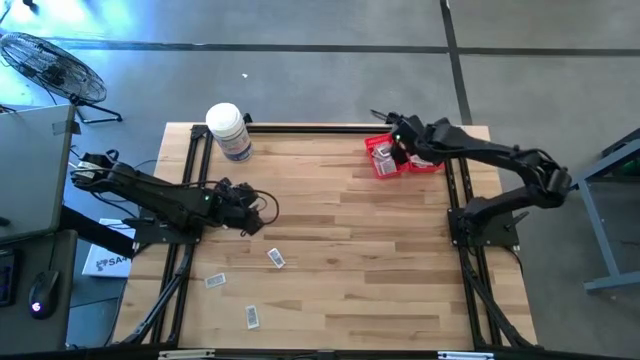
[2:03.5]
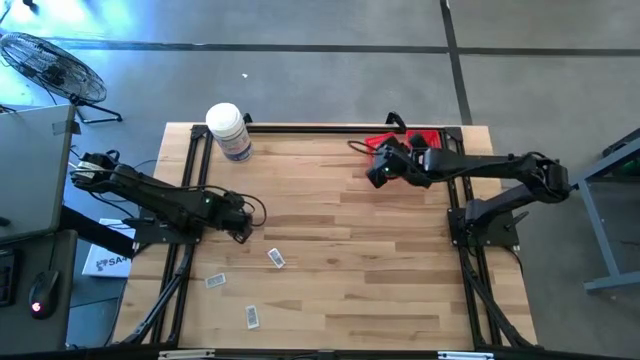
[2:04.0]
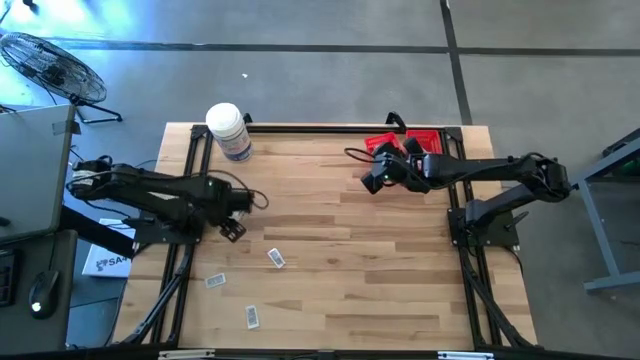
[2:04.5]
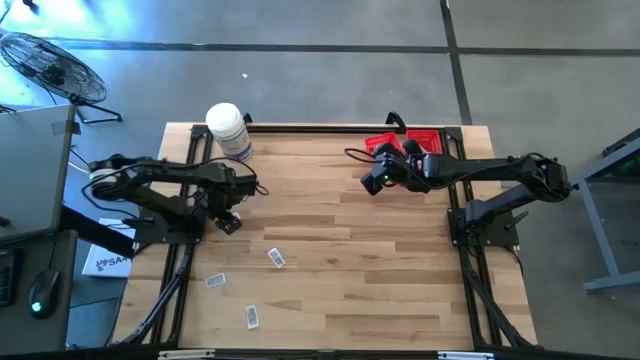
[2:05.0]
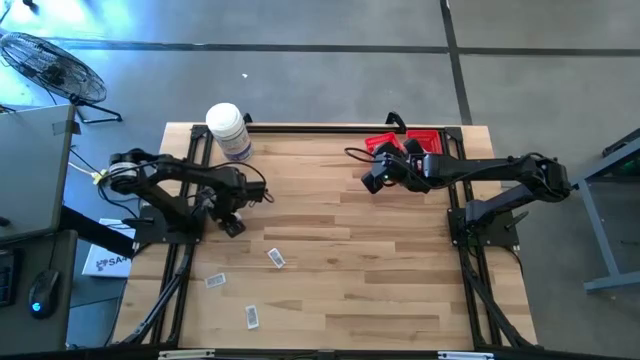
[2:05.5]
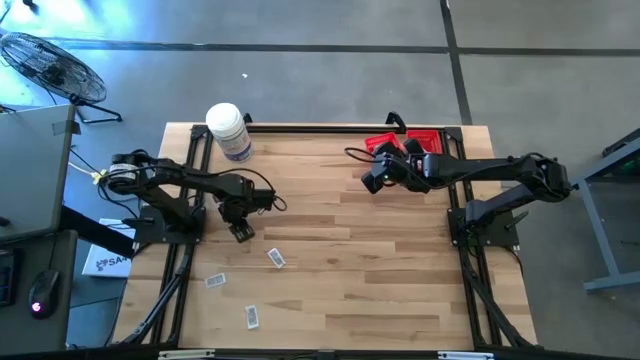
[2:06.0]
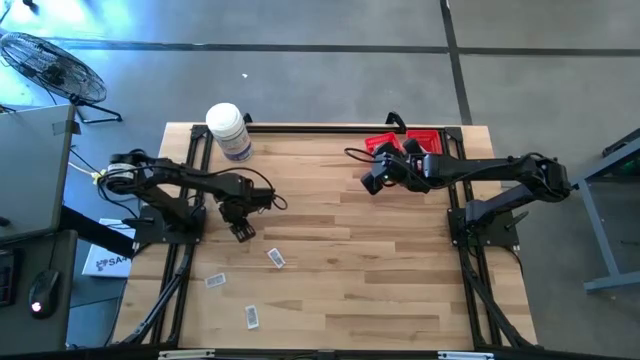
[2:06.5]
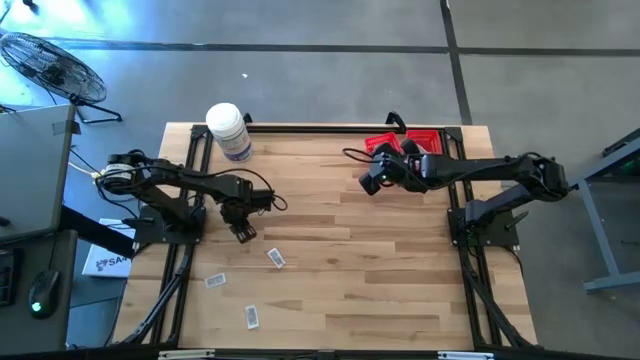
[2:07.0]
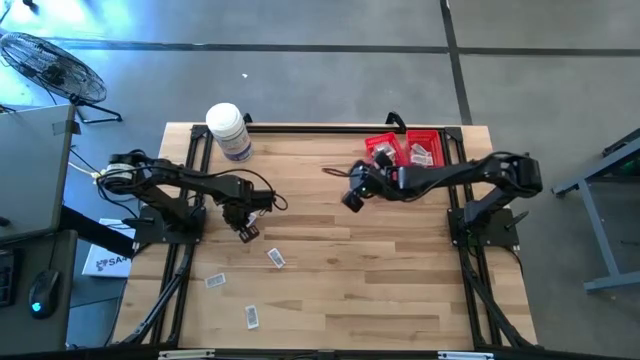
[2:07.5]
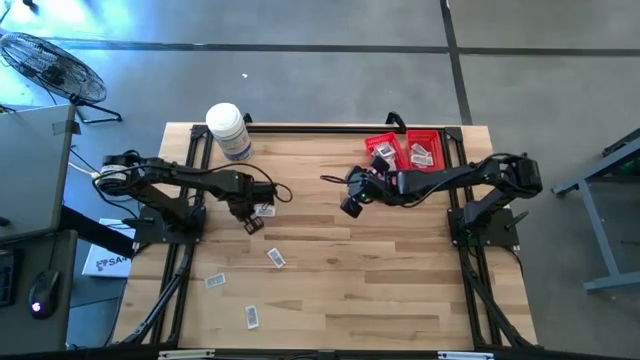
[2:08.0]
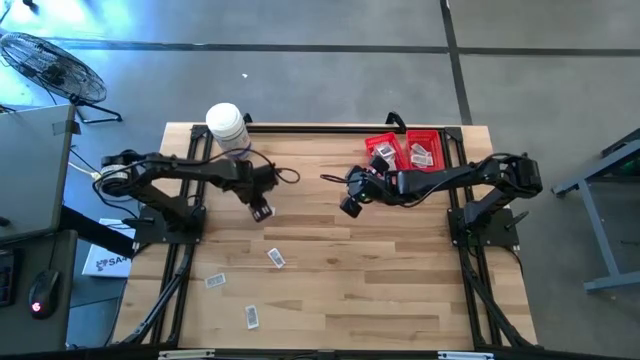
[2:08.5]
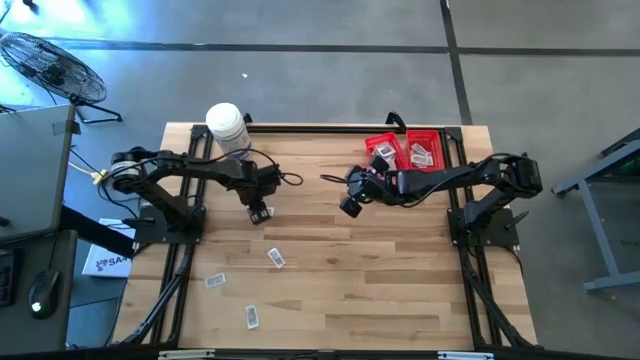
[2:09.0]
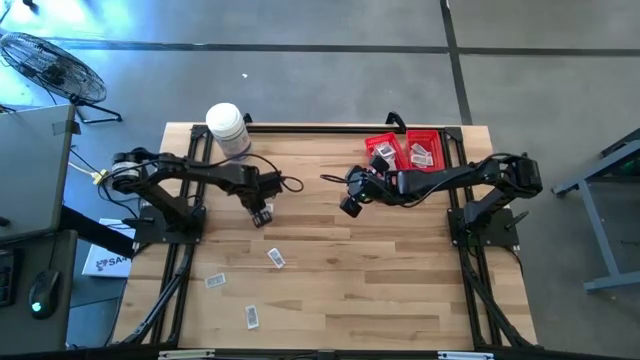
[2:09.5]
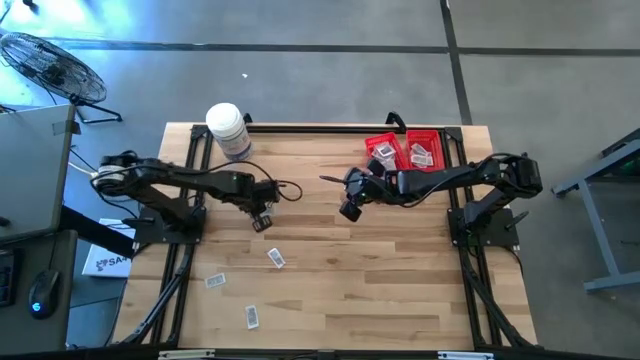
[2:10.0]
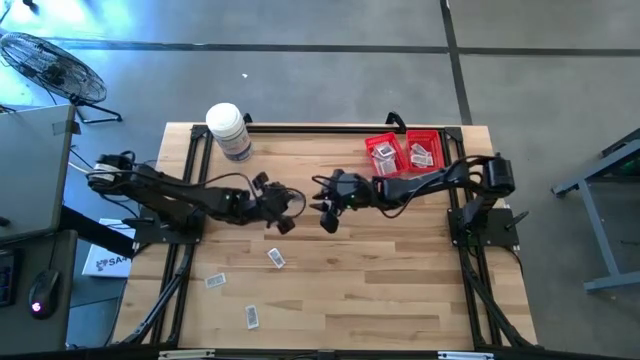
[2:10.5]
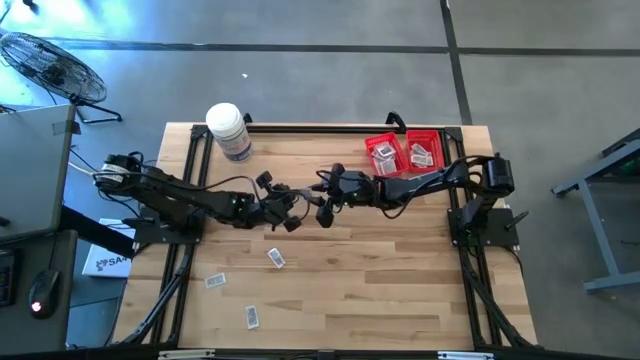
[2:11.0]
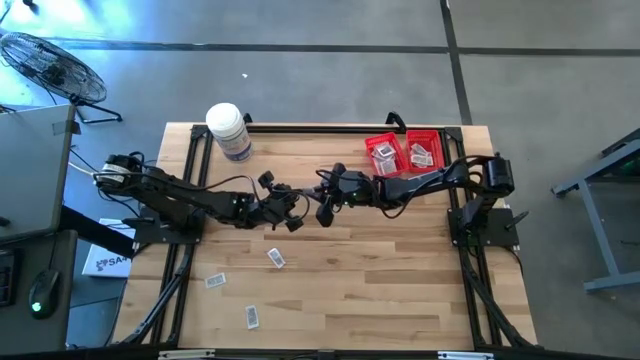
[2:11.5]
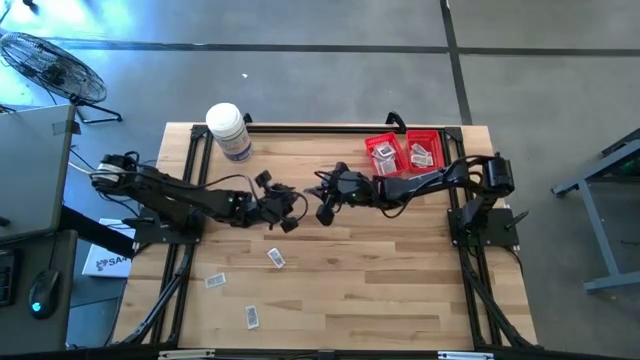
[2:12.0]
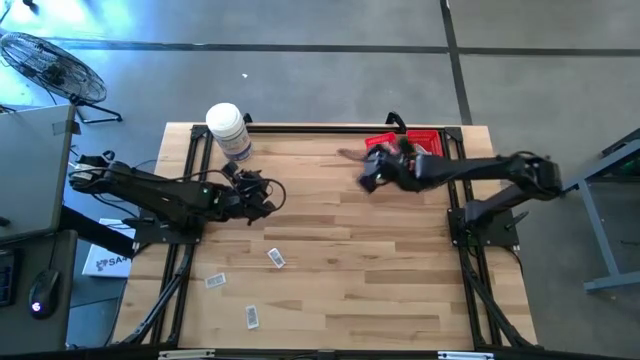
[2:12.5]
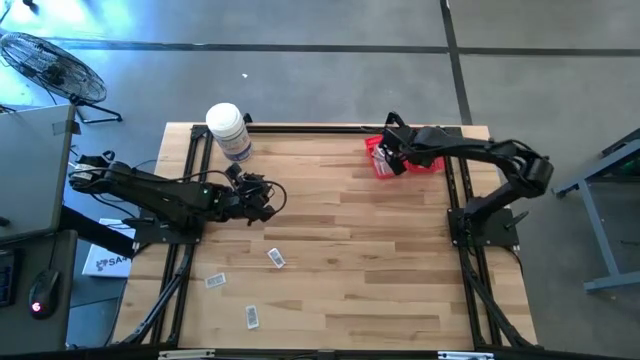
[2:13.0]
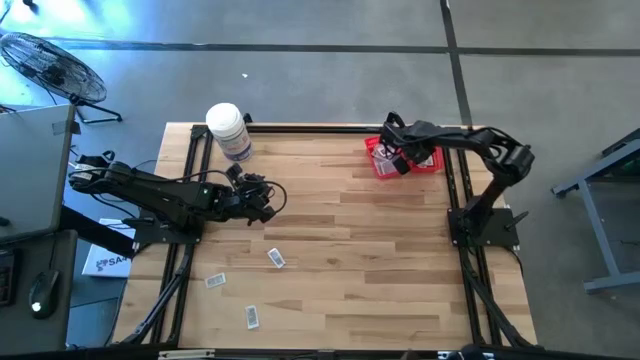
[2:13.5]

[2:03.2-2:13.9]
Task: Pick & Place First Aid Supplies
Put the ointment pack into the right red bin

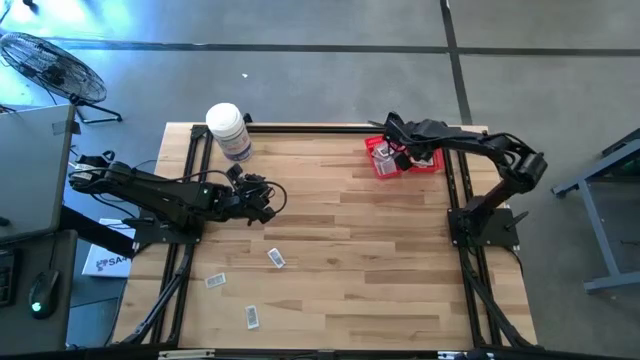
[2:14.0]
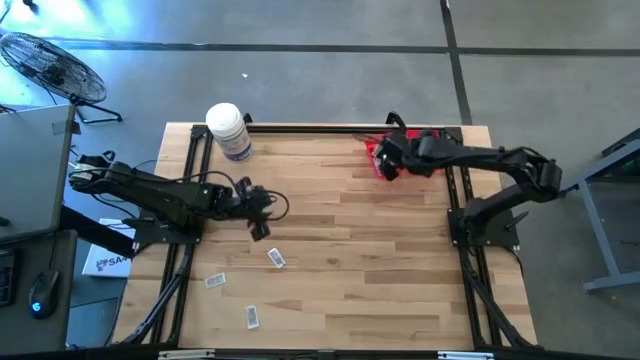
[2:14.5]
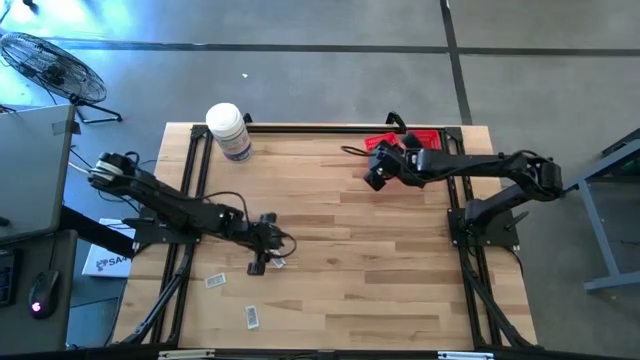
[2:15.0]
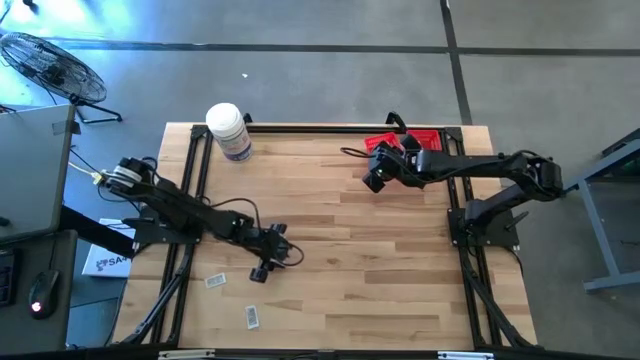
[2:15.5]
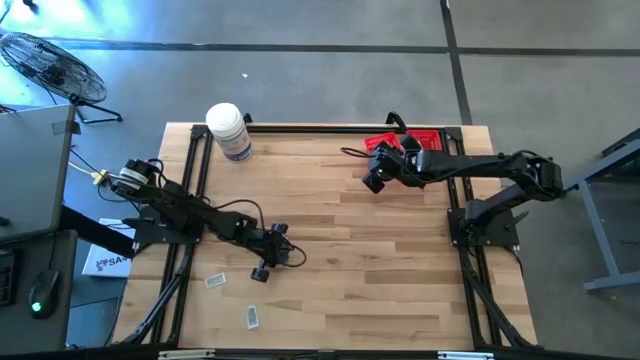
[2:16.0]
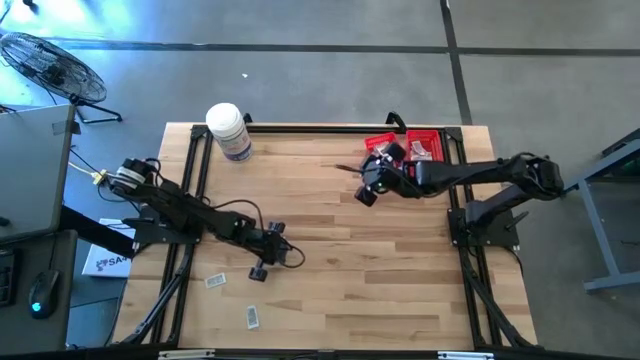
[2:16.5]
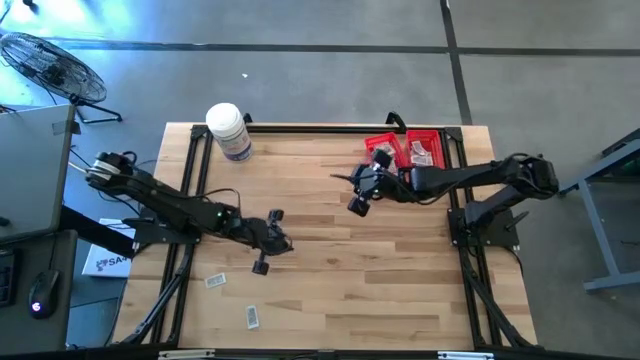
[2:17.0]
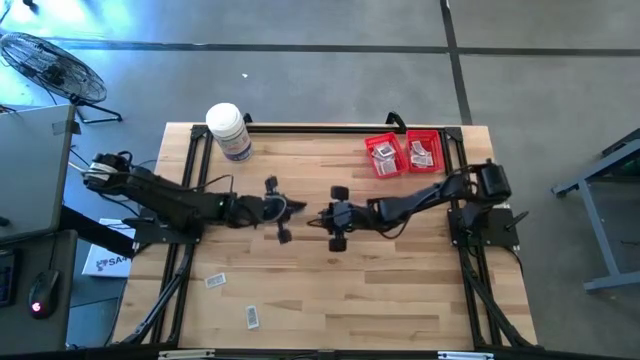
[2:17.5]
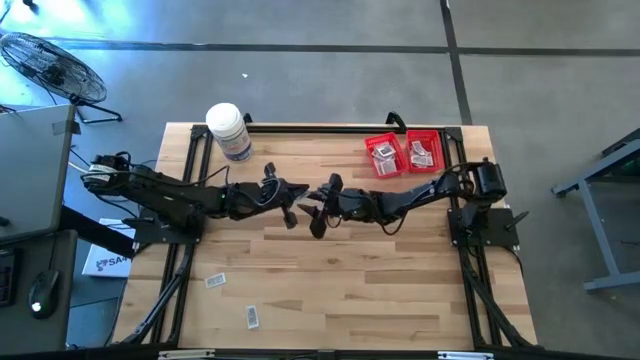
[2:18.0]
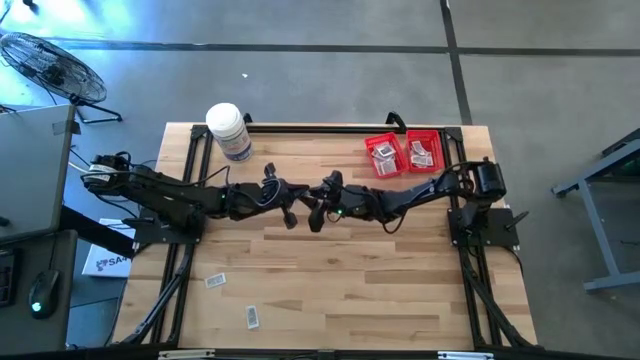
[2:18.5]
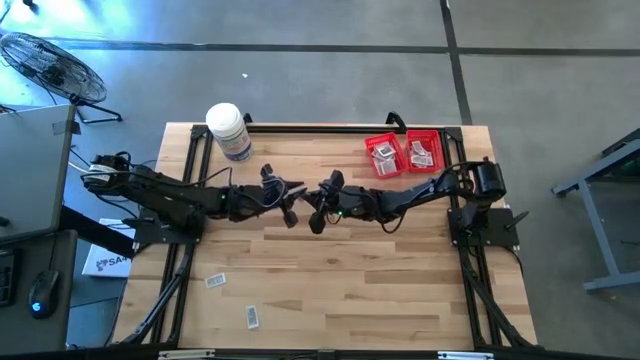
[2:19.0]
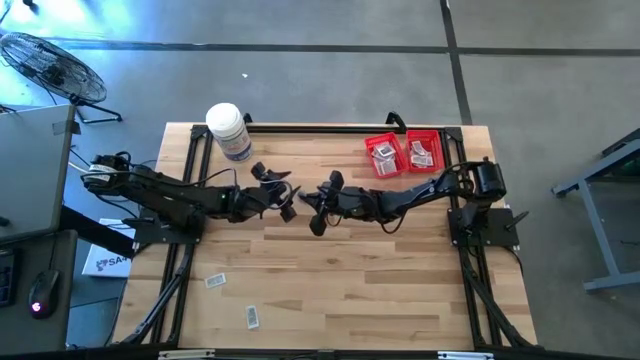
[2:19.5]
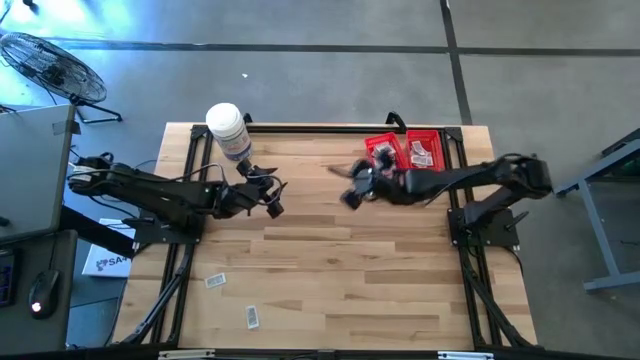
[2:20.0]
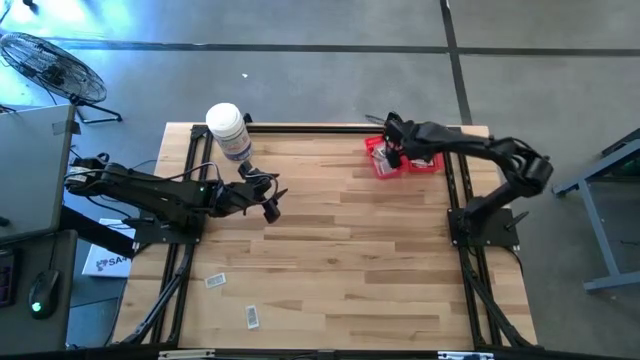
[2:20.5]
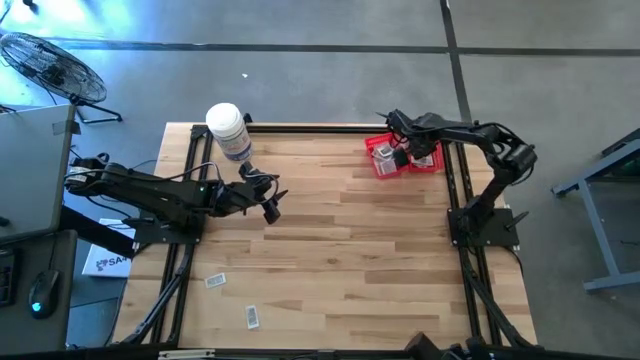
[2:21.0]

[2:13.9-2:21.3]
Put the ointment pack into the right red bin

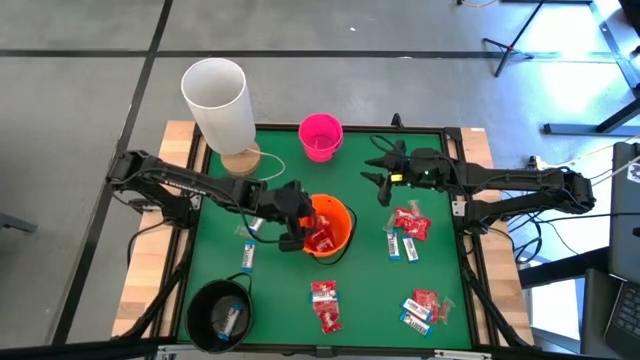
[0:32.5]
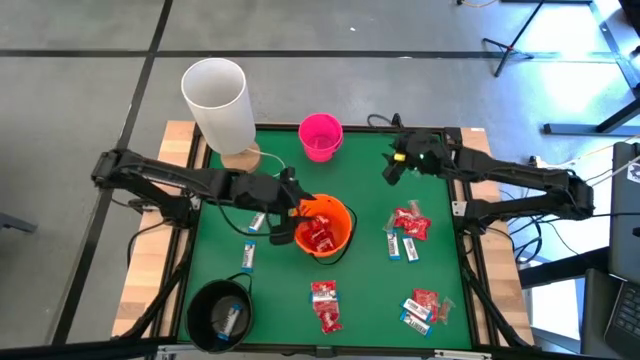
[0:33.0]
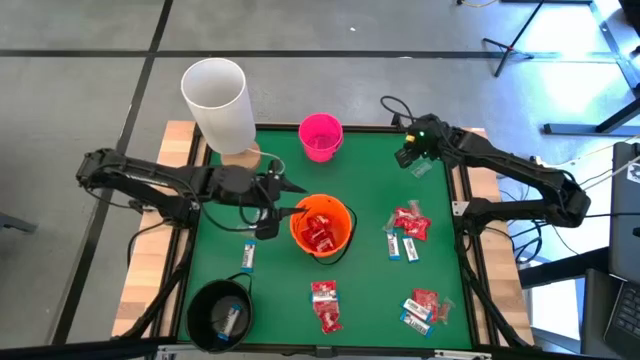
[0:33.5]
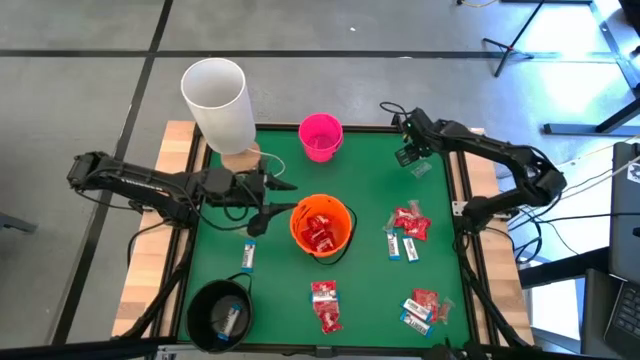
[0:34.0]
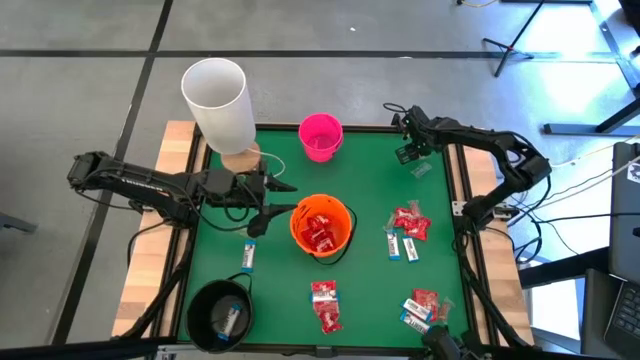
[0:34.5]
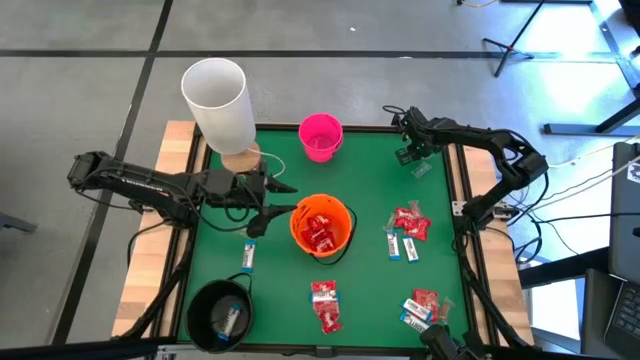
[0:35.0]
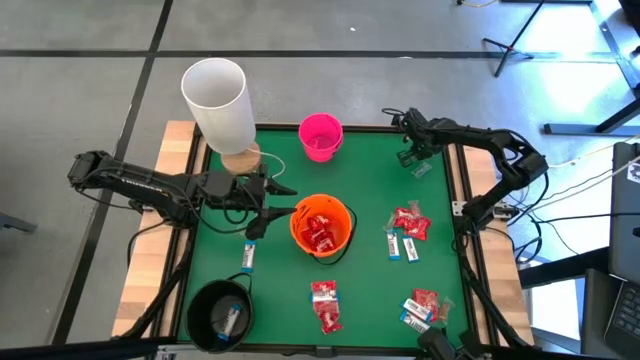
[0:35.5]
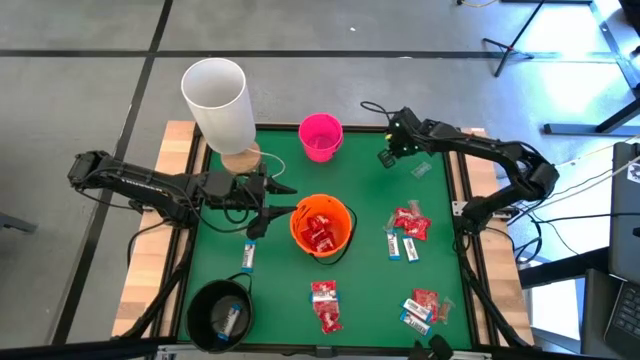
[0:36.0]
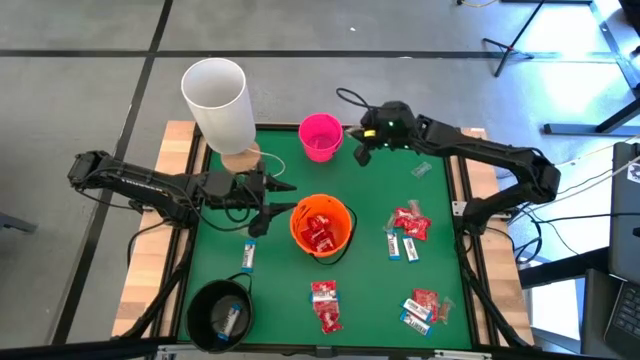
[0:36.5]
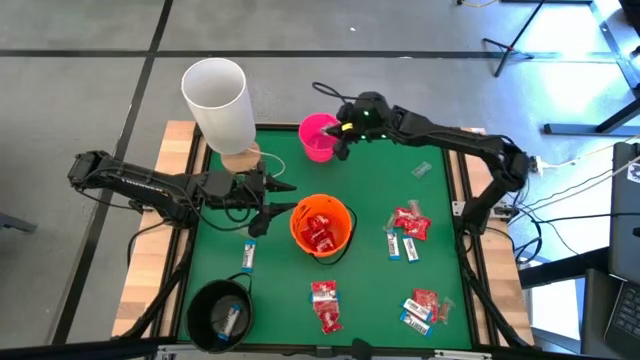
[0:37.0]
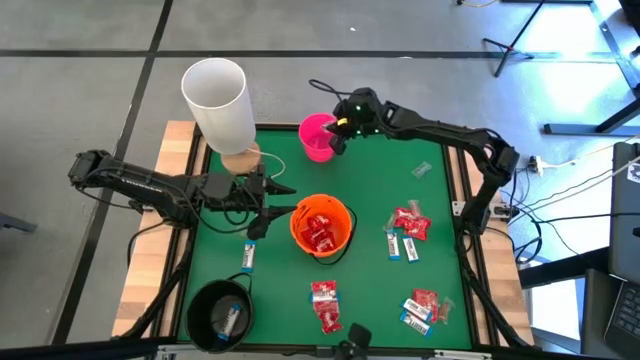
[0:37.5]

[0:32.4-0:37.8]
Task: Sort candy
Put the green gummy into the pink bucket
